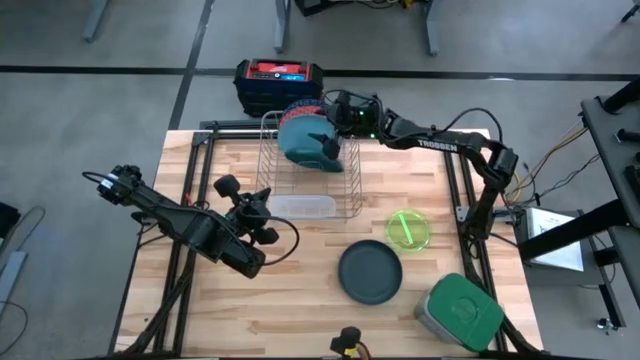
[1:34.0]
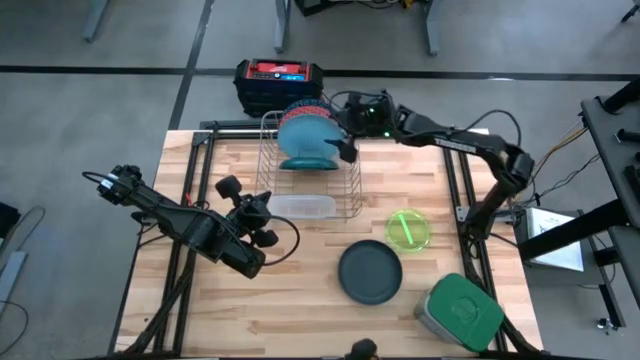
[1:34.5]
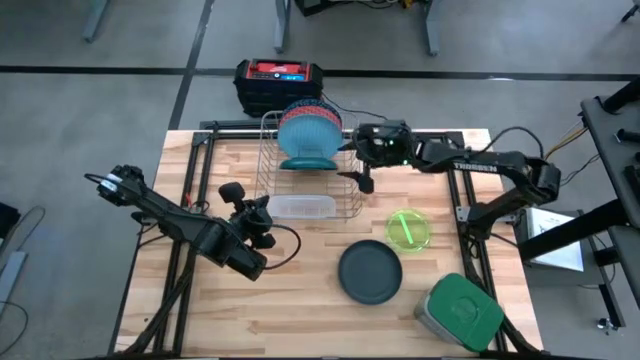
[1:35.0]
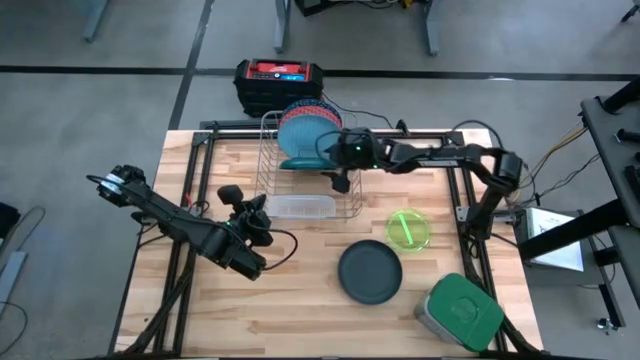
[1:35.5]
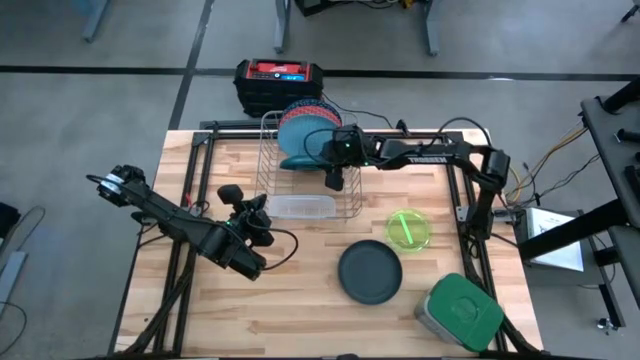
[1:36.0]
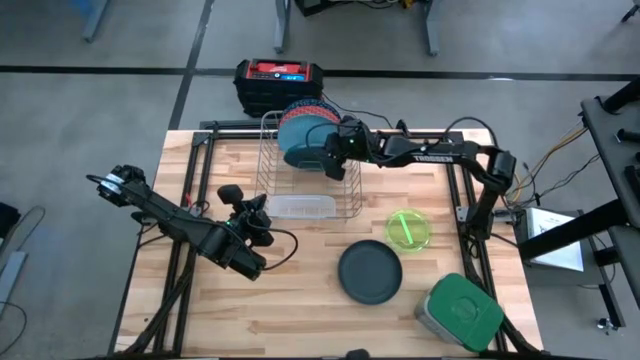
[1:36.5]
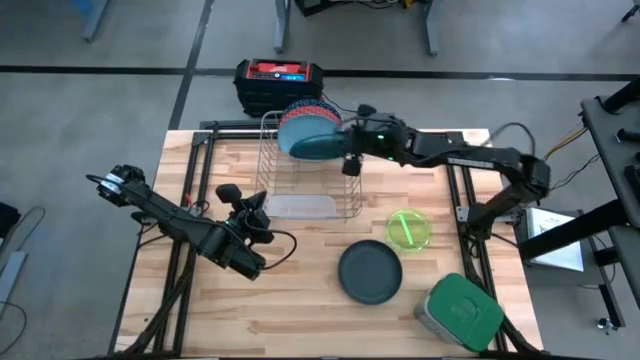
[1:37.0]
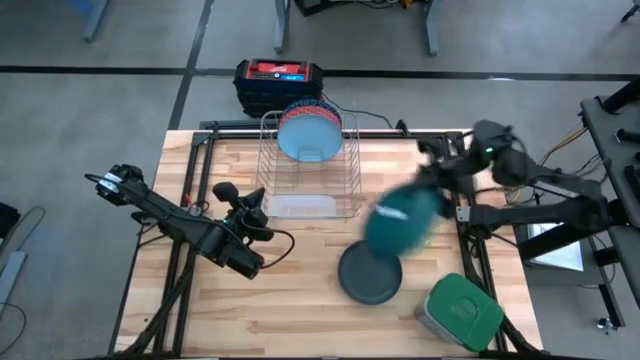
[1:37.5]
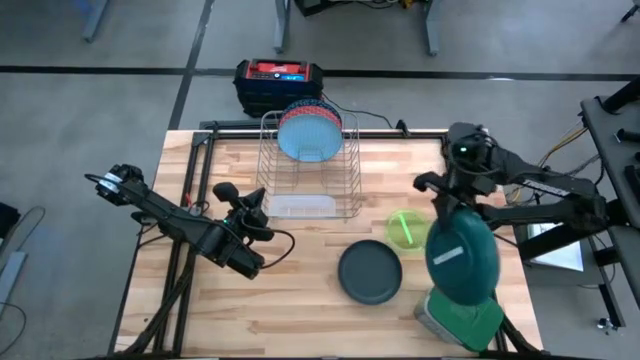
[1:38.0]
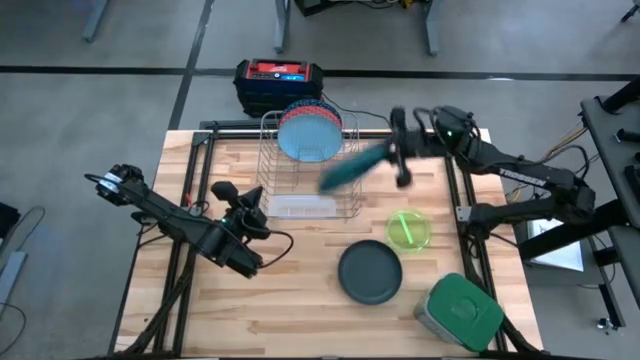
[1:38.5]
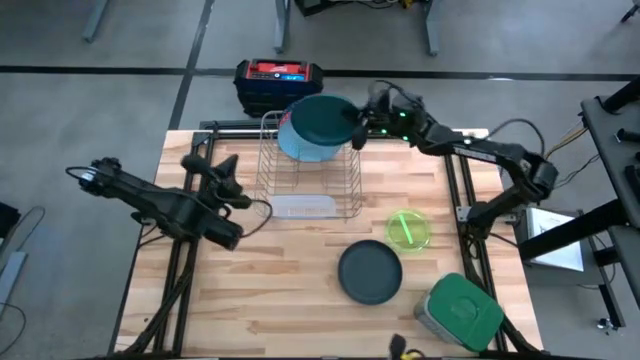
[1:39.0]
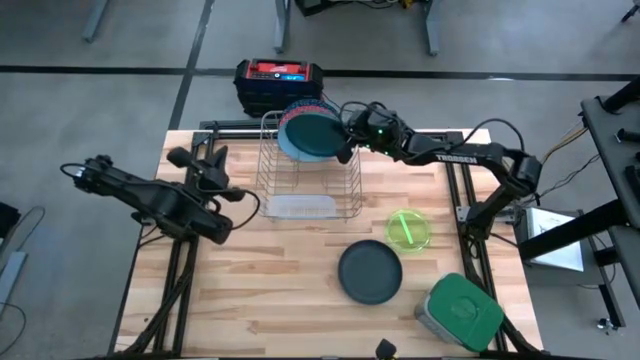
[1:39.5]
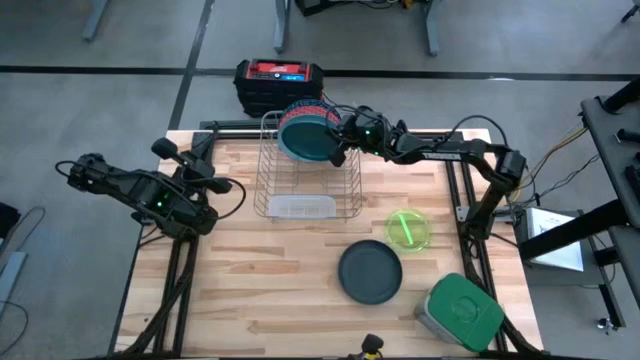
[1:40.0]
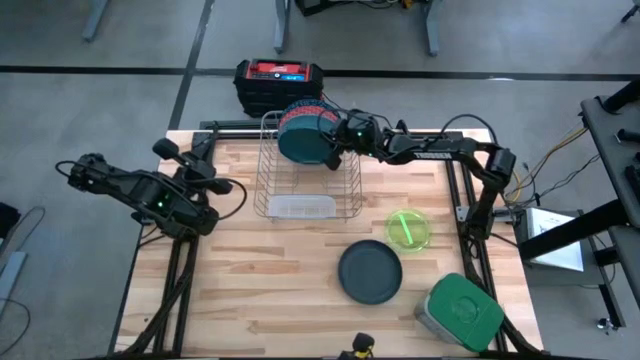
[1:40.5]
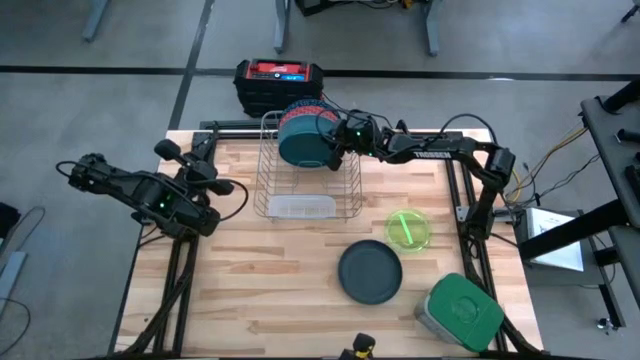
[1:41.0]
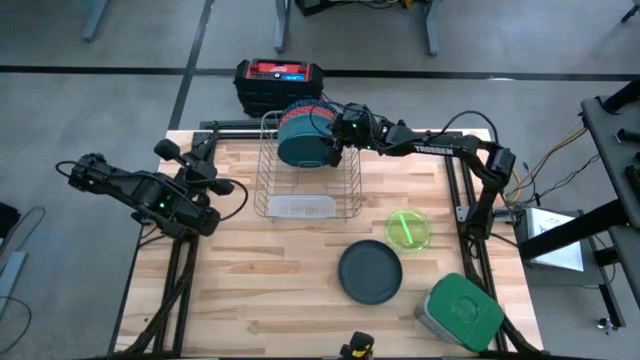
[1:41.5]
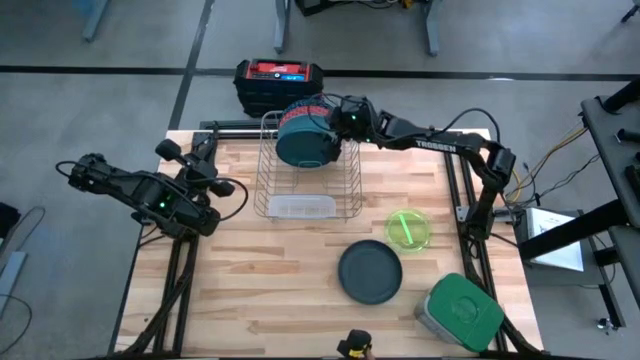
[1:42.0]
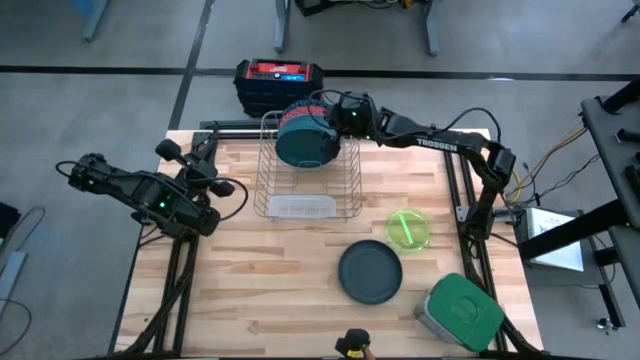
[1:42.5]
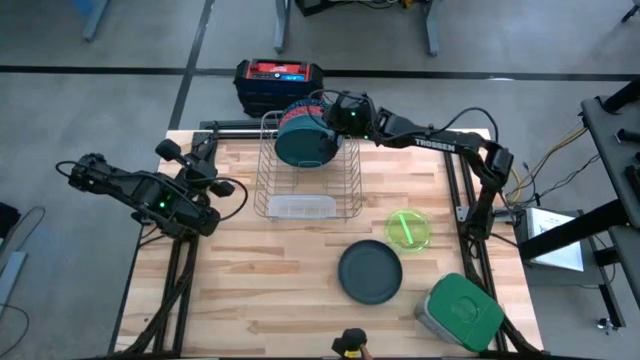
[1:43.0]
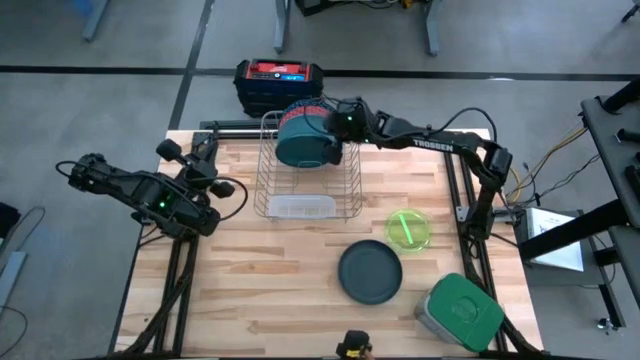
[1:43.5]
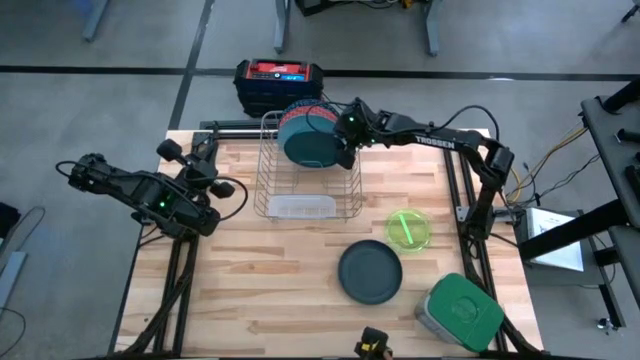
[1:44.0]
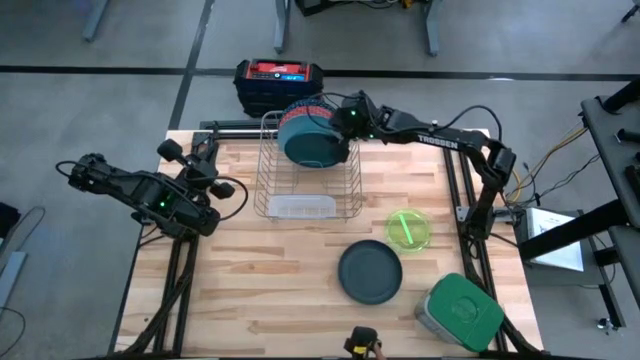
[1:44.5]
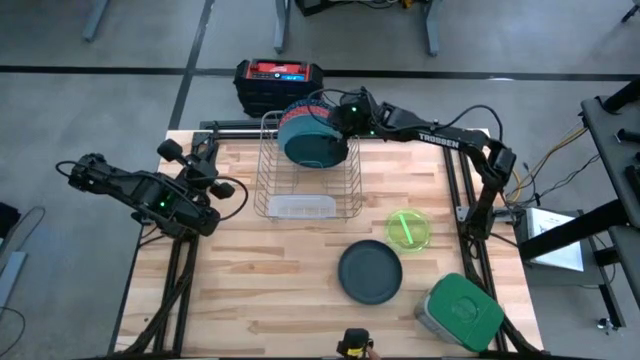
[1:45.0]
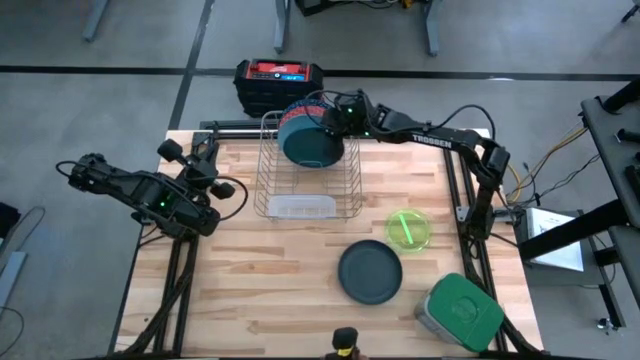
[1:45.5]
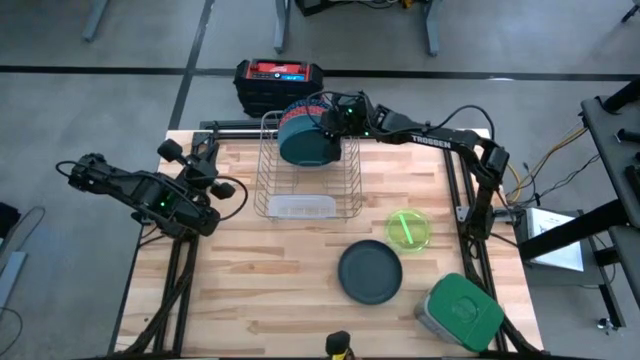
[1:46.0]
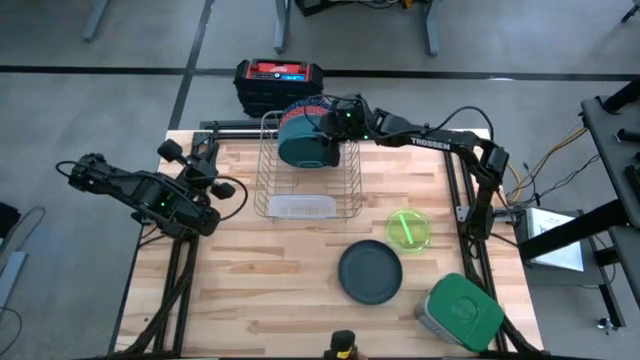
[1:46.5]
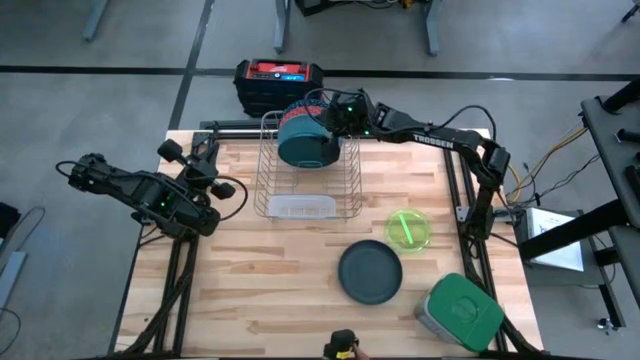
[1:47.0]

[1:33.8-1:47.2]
Task: Sort dishes
Put the dark green plate into the dish rack

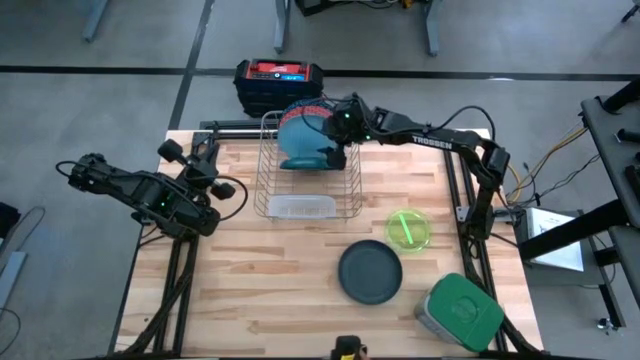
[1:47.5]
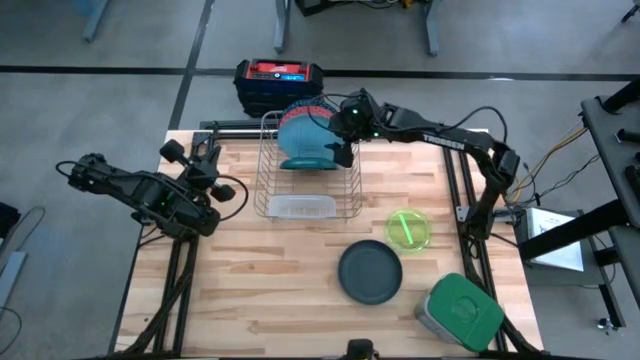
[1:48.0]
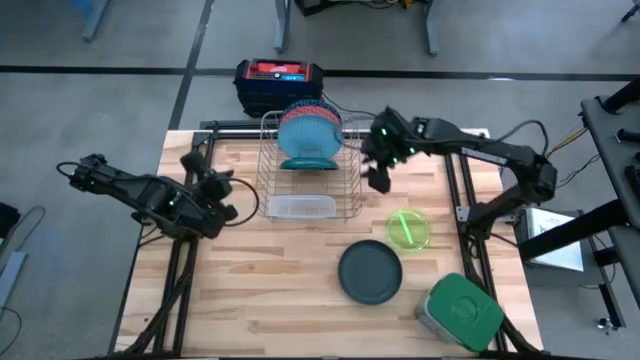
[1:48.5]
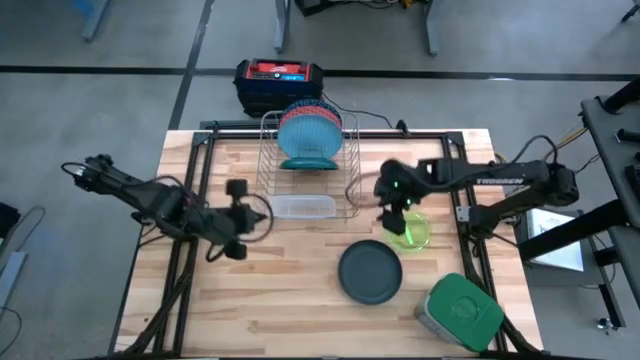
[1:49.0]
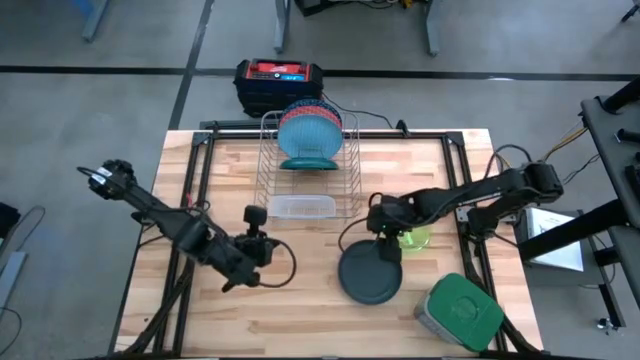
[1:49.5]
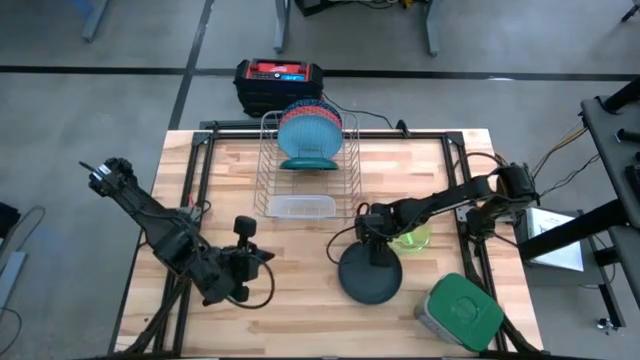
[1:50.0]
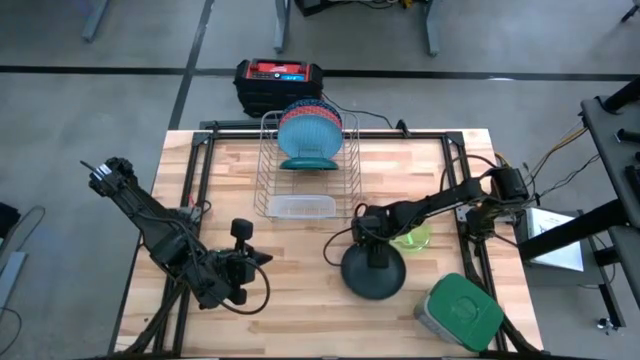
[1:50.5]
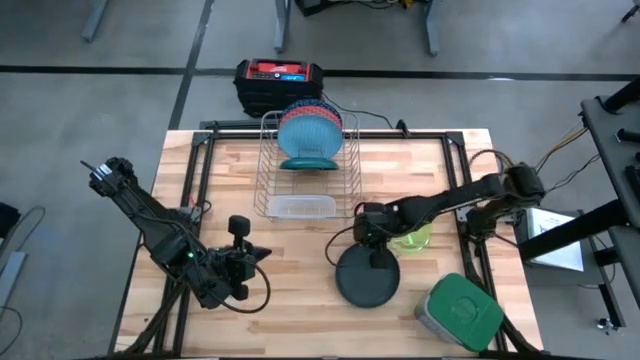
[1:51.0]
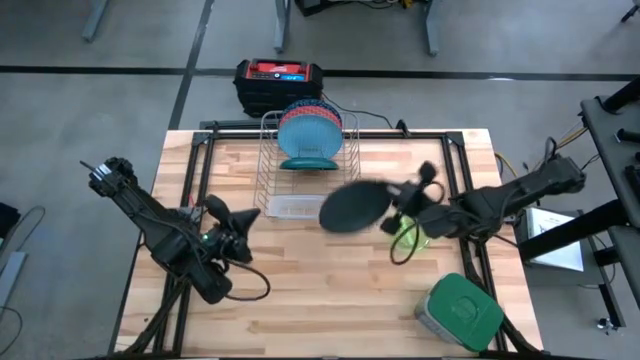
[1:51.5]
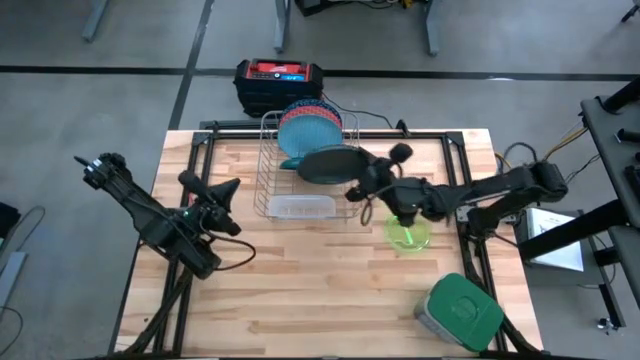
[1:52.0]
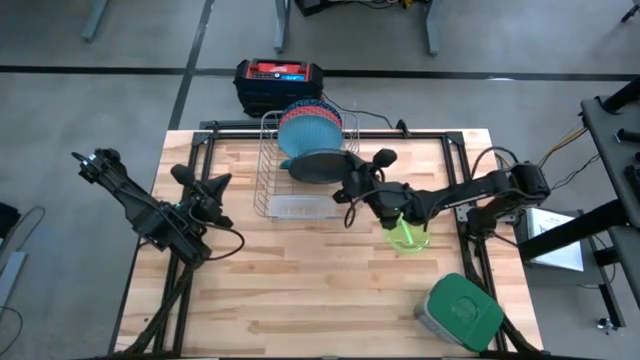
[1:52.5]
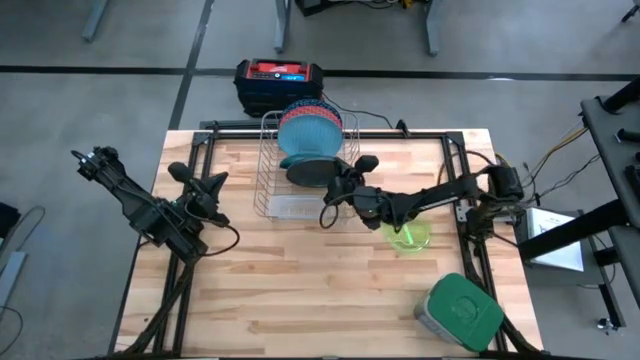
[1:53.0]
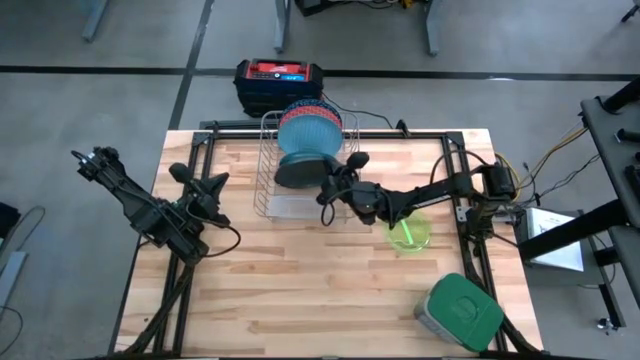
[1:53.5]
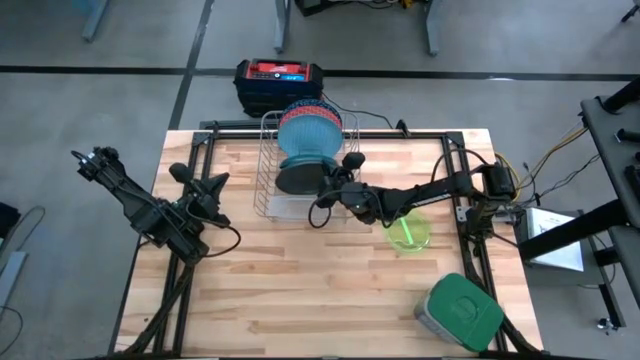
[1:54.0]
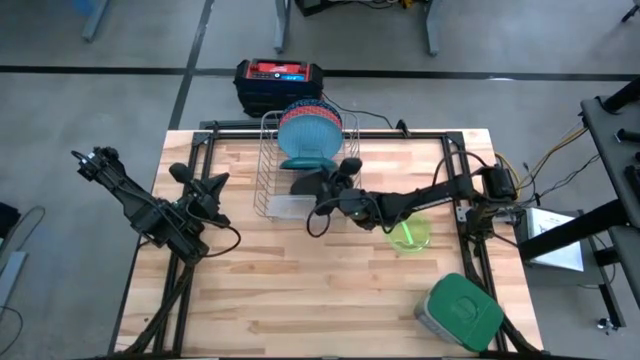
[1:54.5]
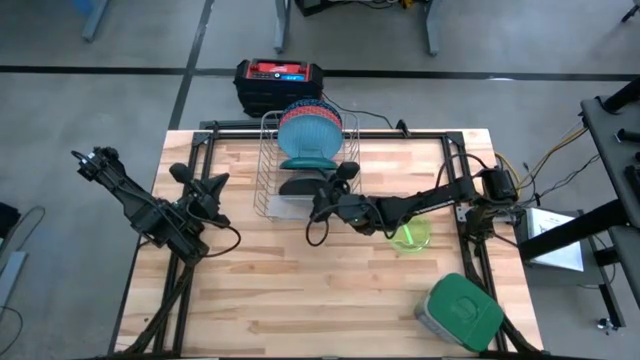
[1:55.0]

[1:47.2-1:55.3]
Put the black plate into the dish rack
